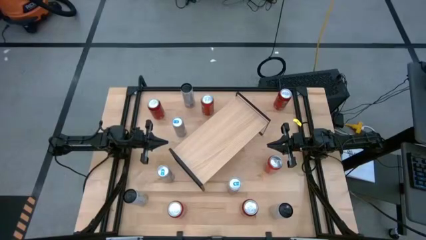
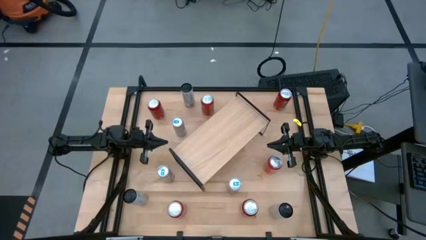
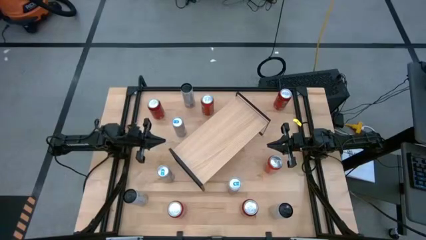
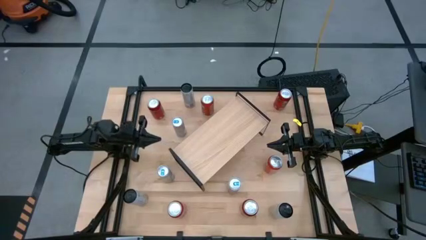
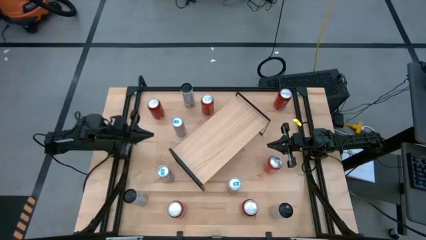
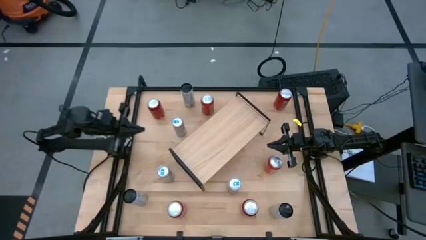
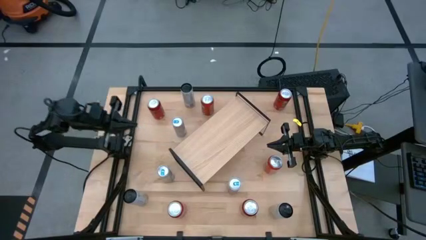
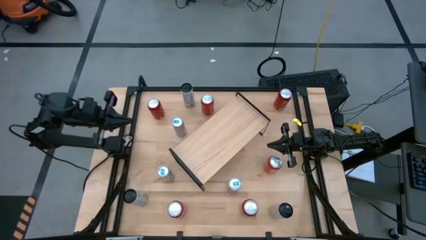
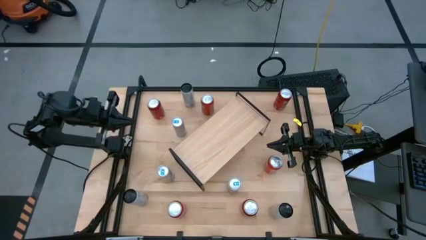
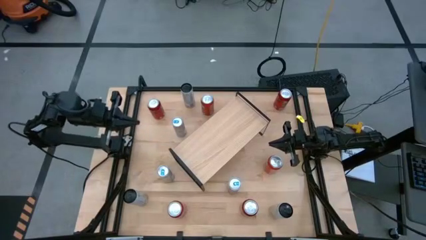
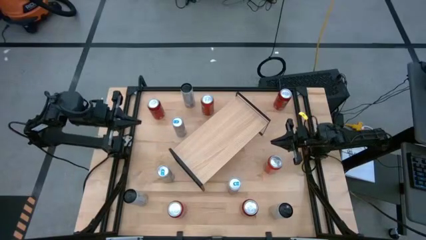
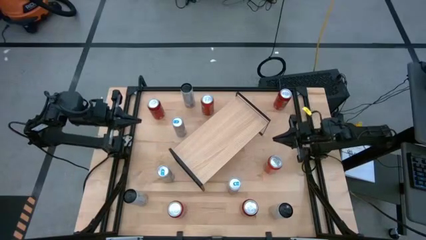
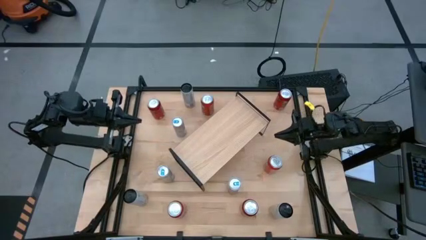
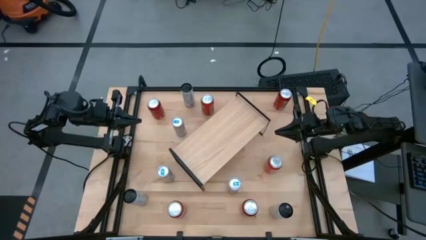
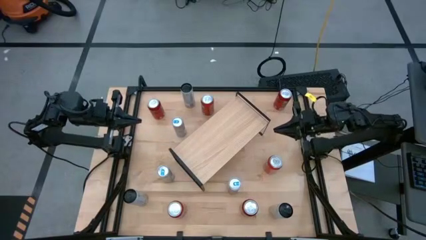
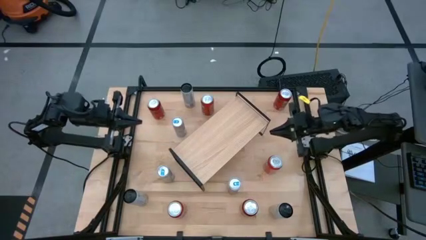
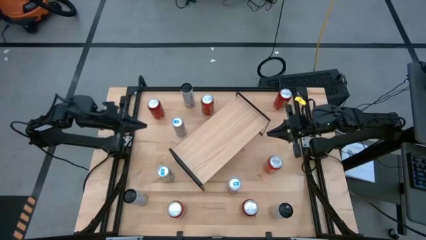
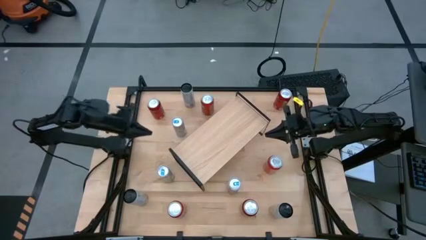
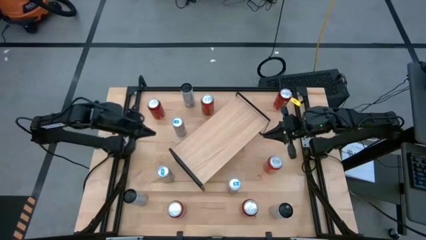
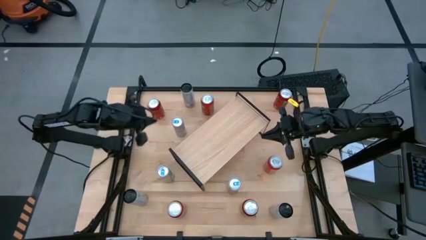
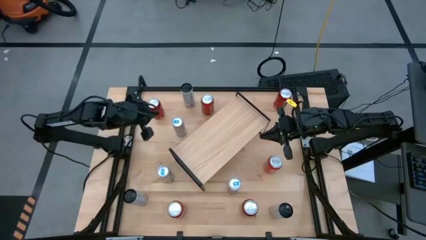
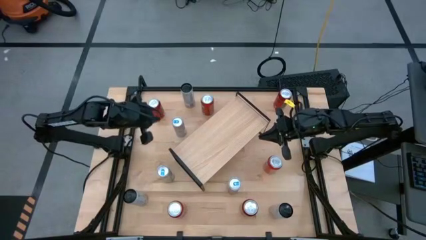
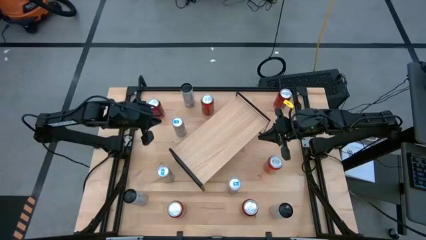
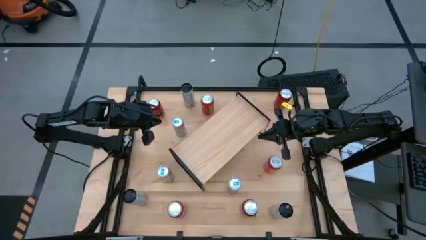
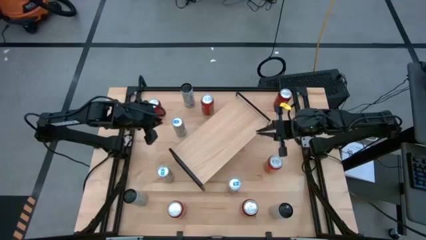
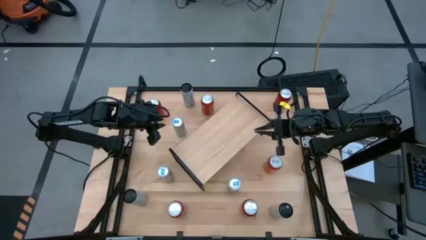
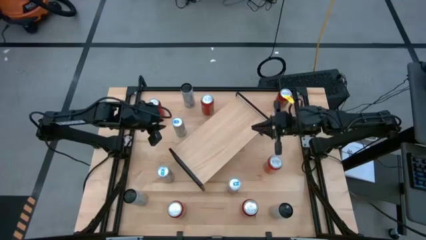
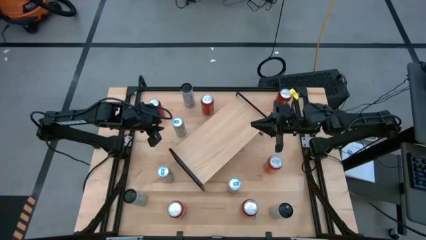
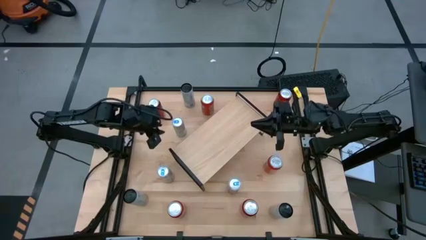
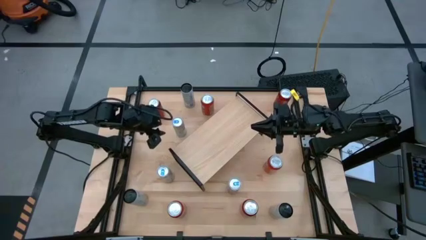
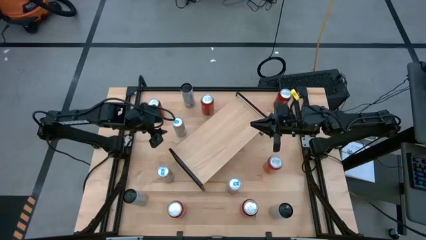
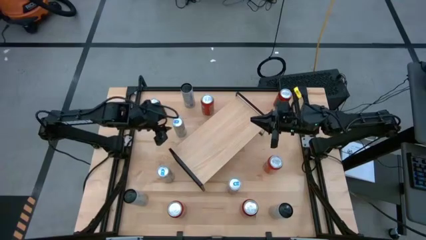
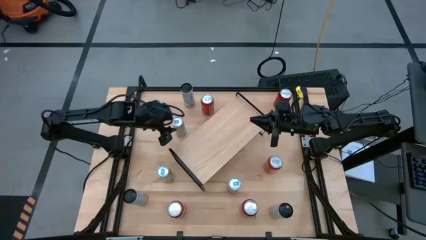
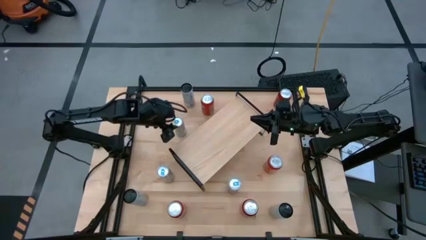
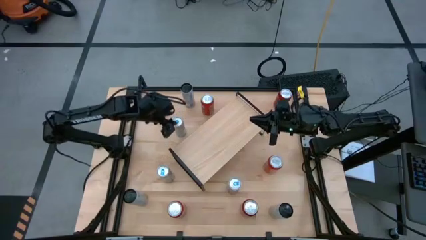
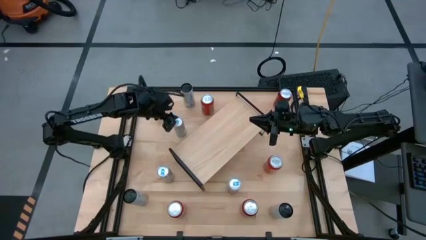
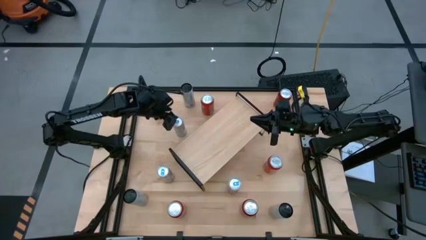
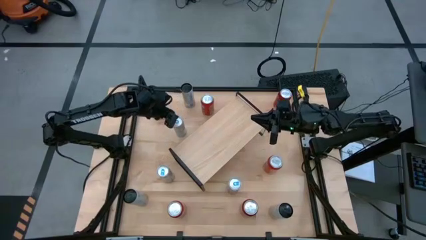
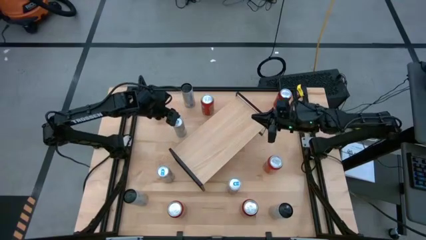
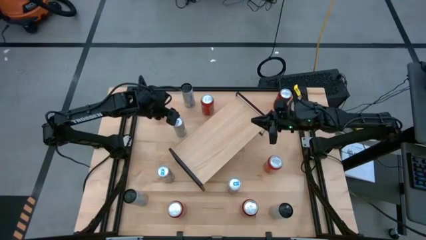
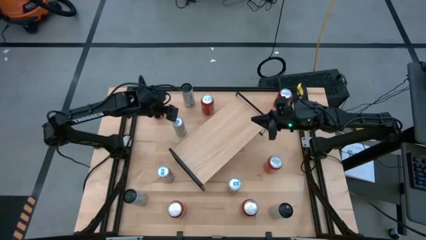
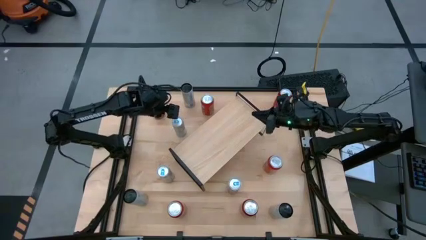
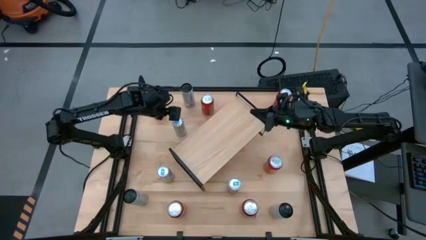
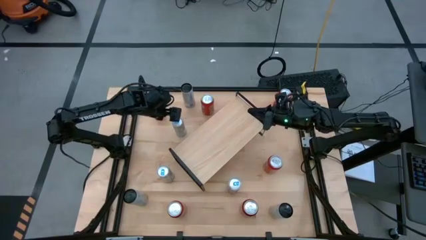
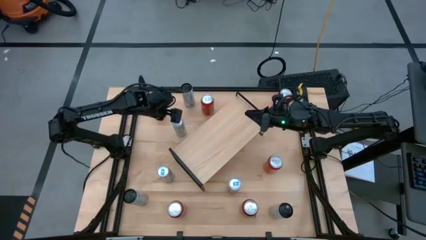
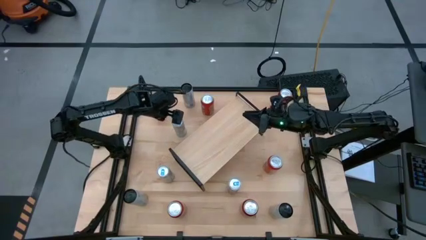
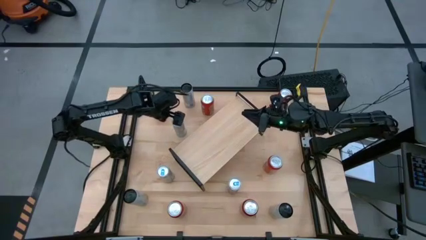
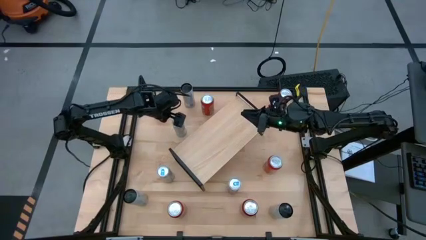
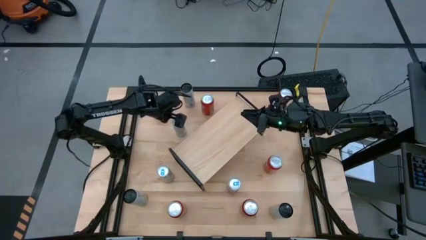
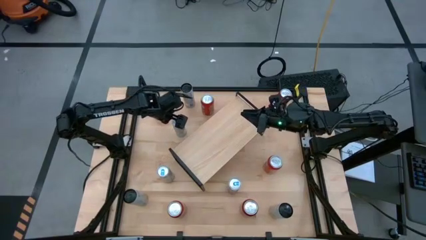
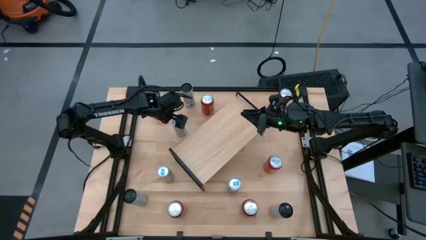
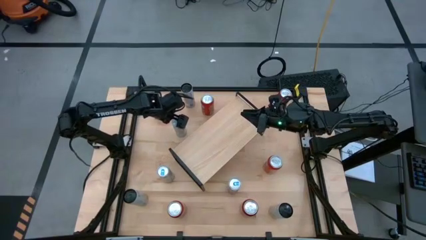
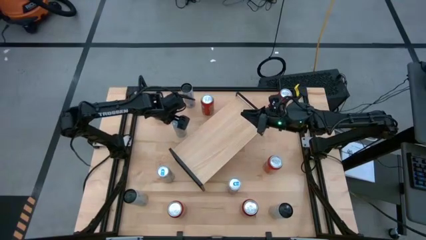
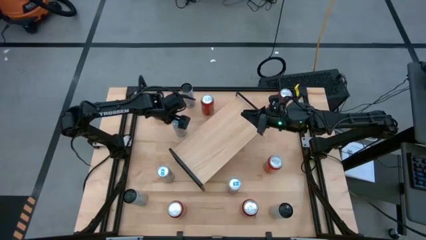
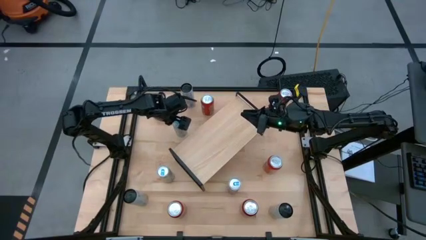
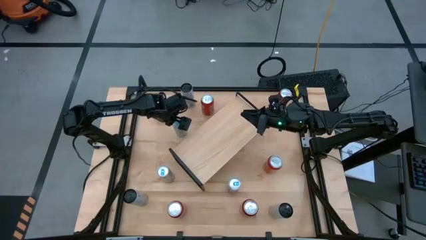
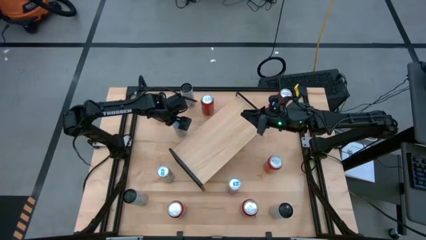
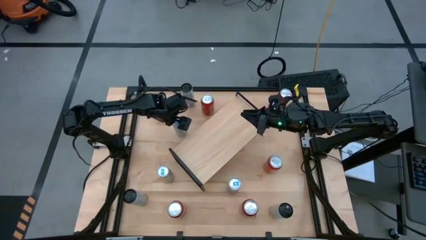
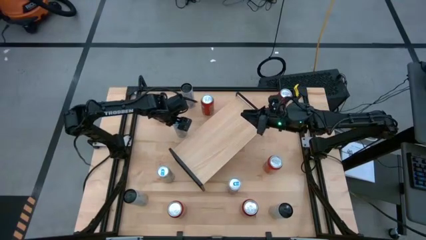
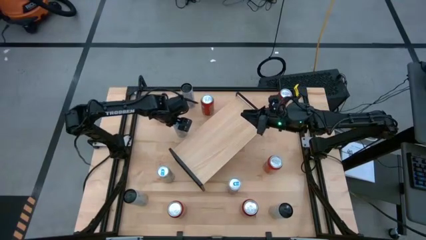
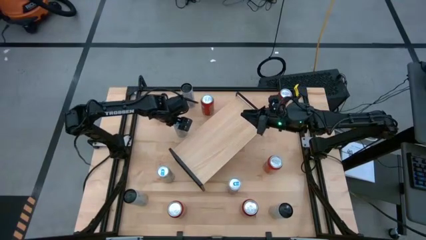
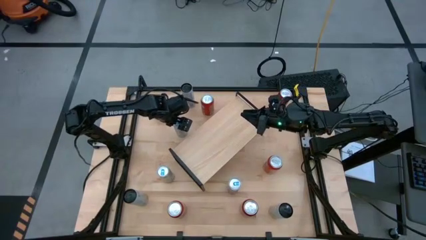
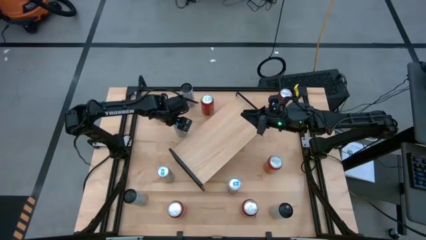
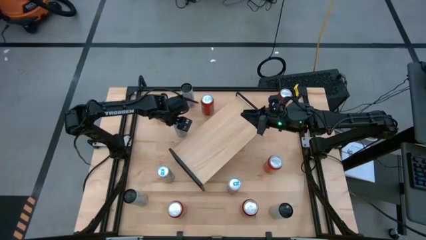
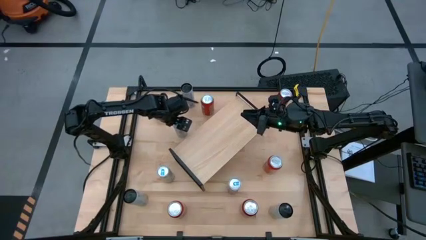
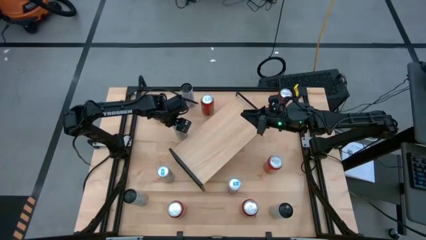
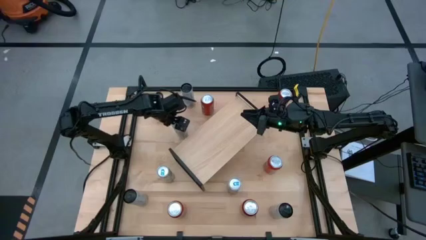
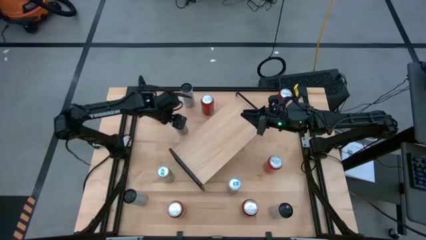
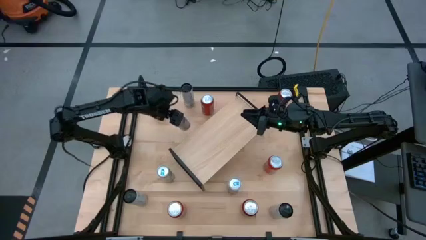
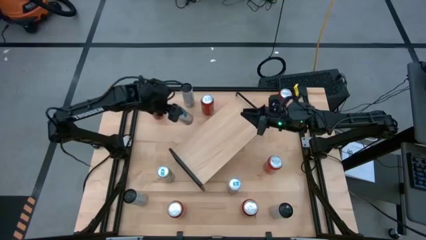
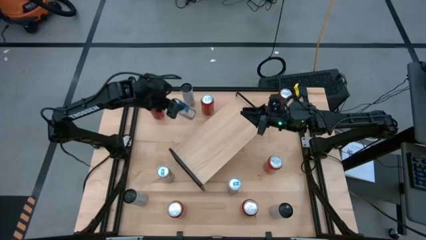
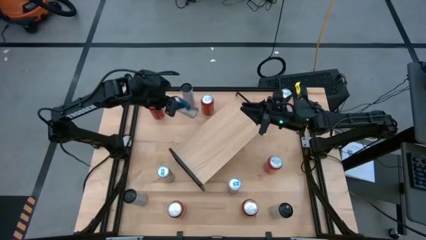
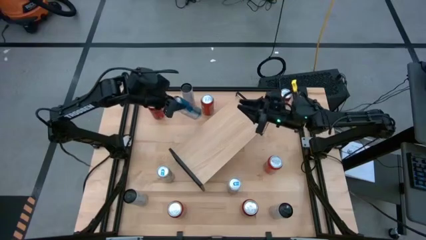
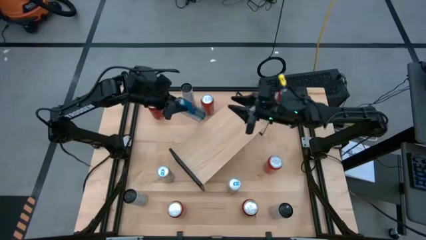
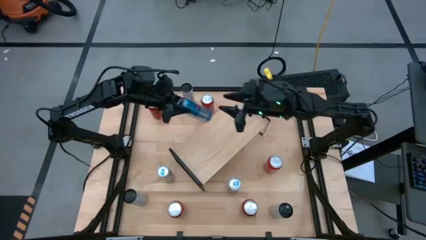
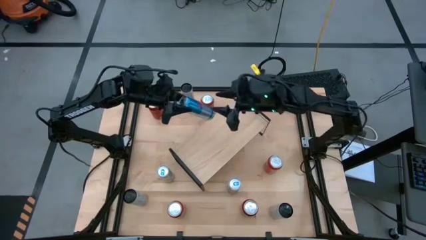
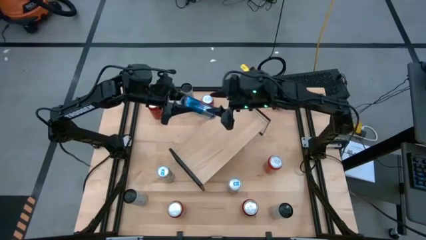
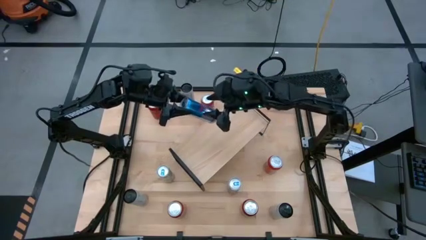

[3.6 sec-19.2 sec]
Task: Place canned beverage on shelf
Put the top blue soda can on the shelf
